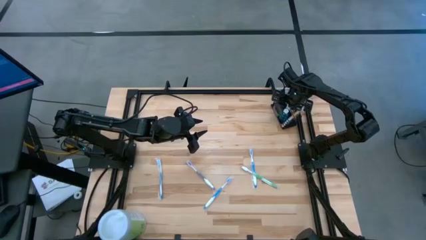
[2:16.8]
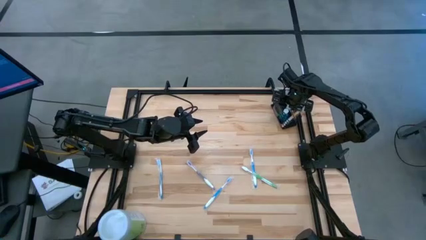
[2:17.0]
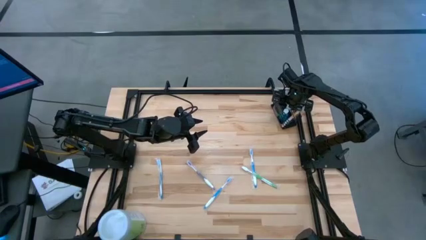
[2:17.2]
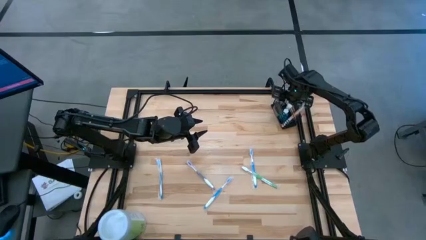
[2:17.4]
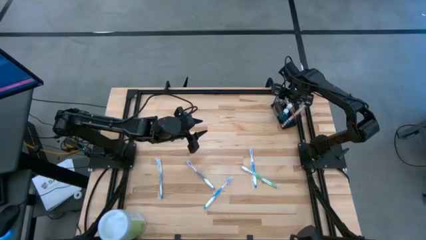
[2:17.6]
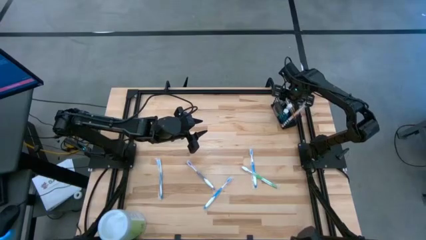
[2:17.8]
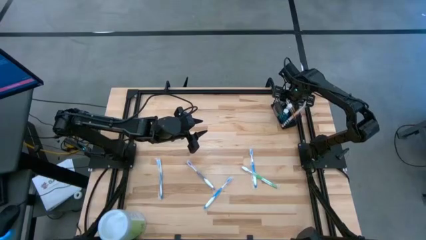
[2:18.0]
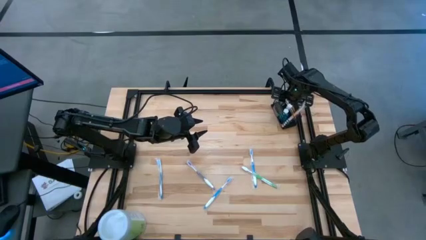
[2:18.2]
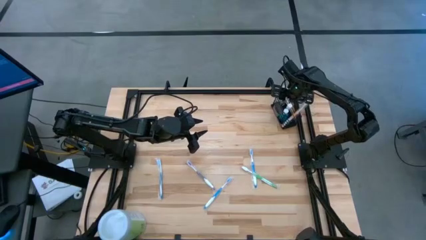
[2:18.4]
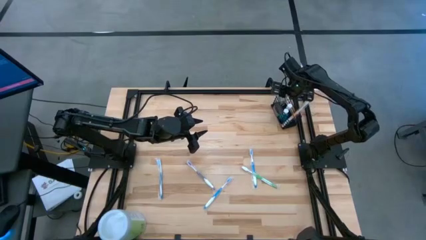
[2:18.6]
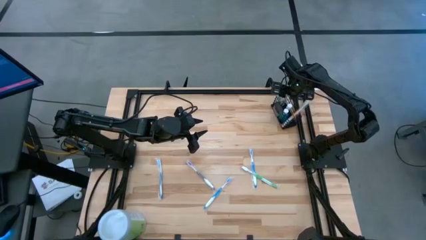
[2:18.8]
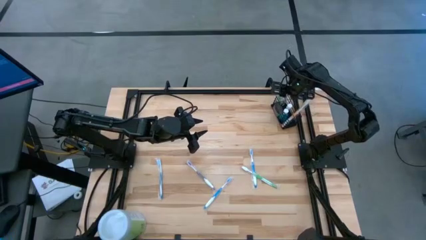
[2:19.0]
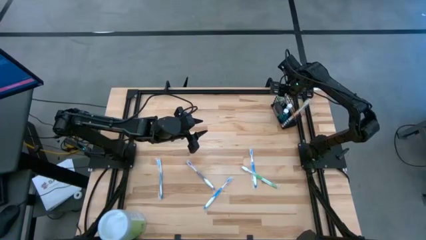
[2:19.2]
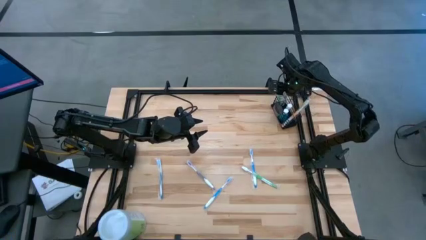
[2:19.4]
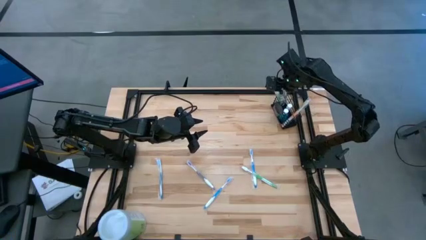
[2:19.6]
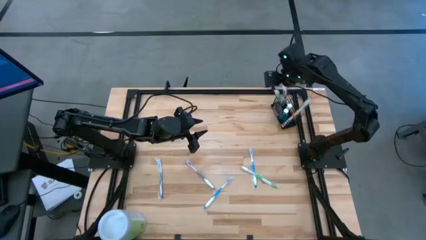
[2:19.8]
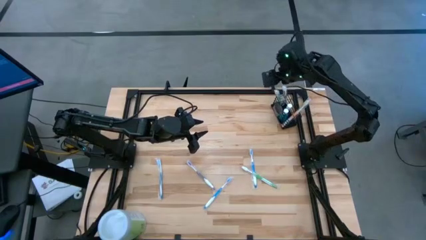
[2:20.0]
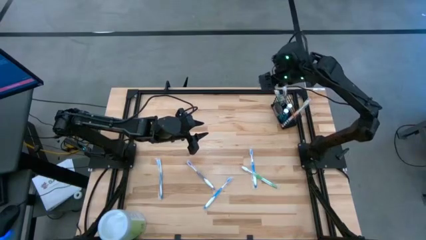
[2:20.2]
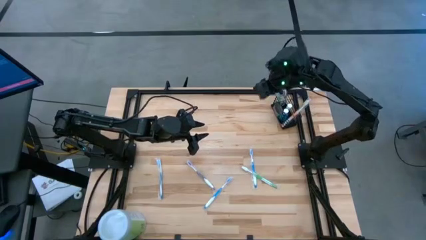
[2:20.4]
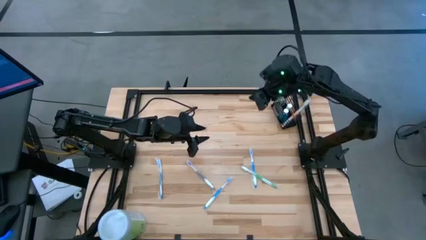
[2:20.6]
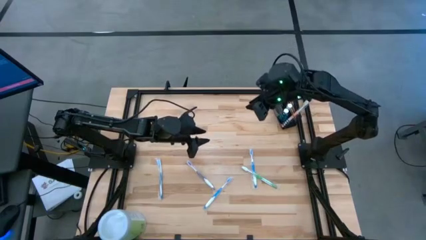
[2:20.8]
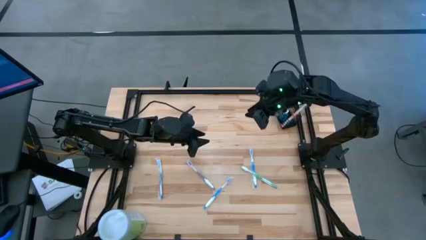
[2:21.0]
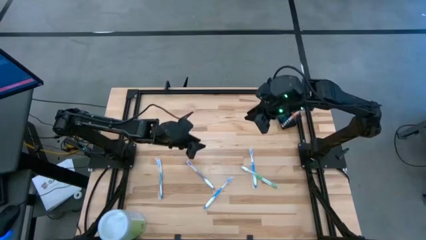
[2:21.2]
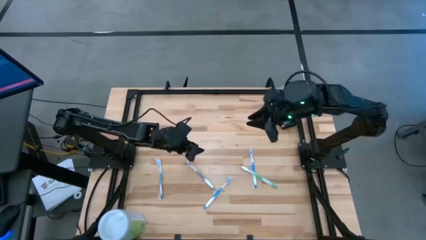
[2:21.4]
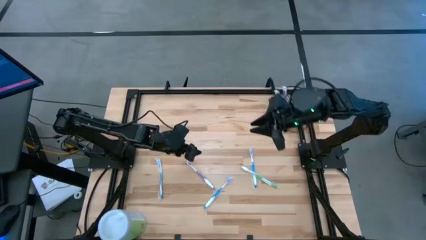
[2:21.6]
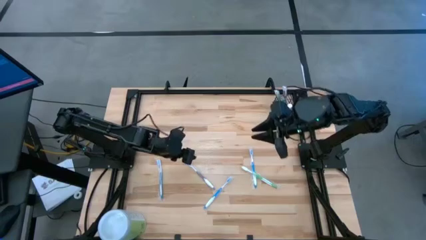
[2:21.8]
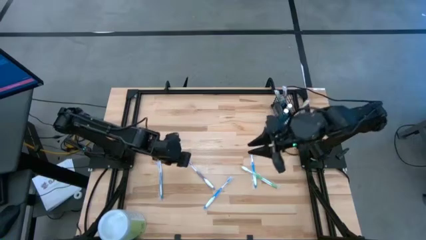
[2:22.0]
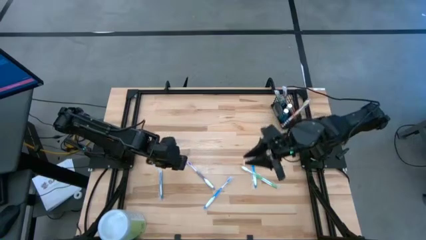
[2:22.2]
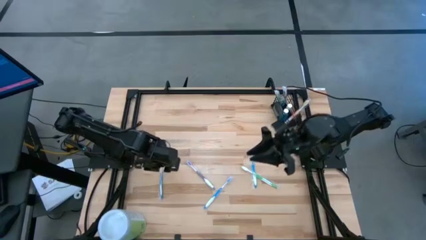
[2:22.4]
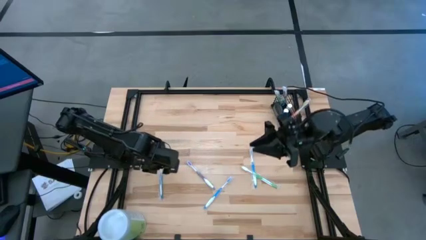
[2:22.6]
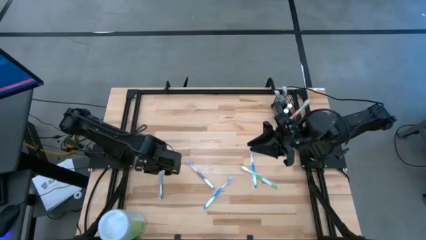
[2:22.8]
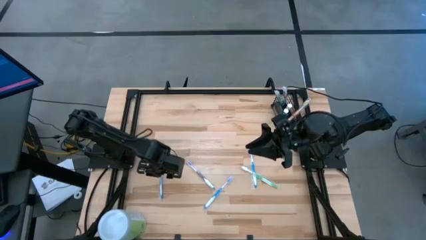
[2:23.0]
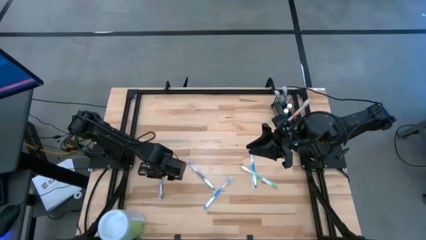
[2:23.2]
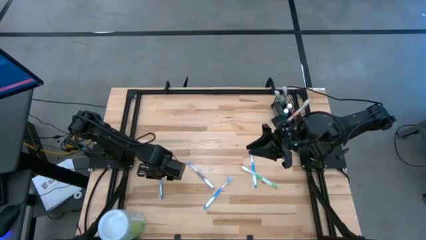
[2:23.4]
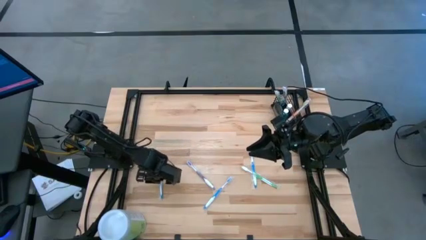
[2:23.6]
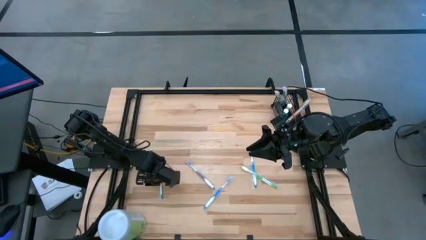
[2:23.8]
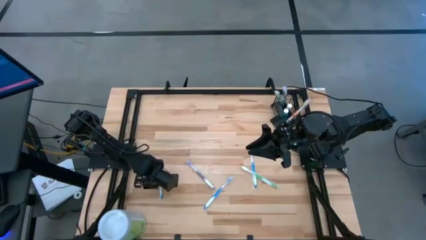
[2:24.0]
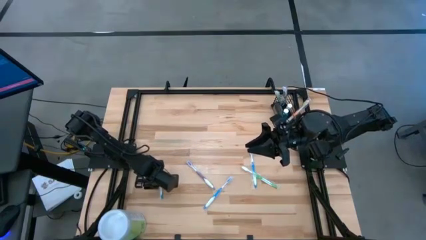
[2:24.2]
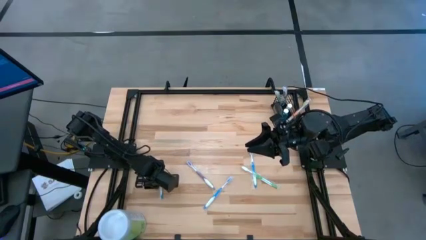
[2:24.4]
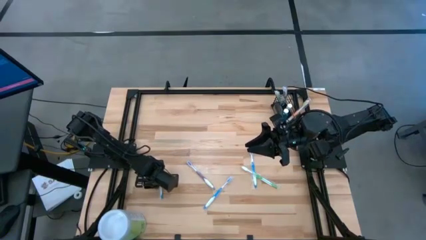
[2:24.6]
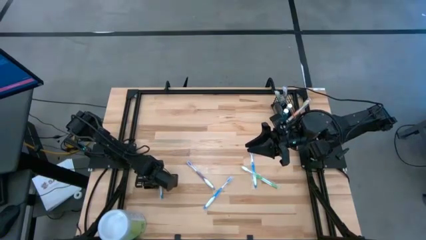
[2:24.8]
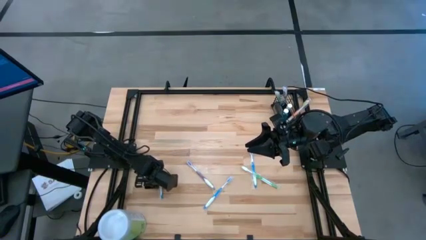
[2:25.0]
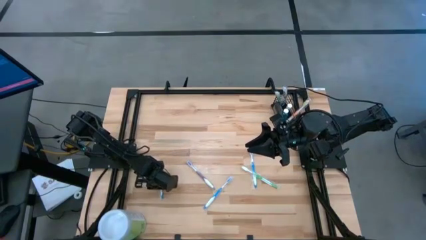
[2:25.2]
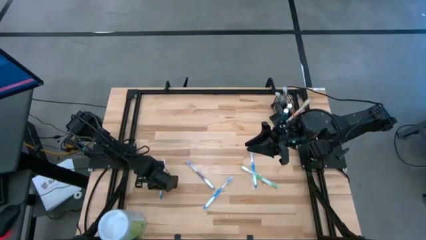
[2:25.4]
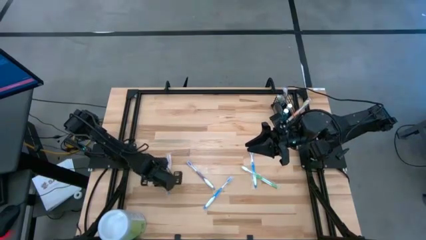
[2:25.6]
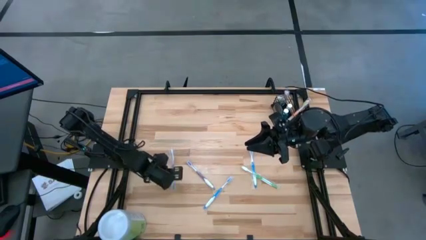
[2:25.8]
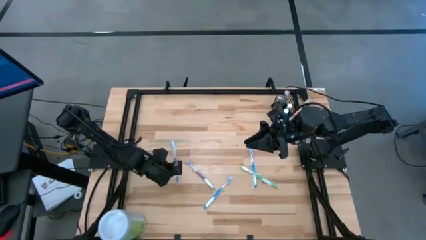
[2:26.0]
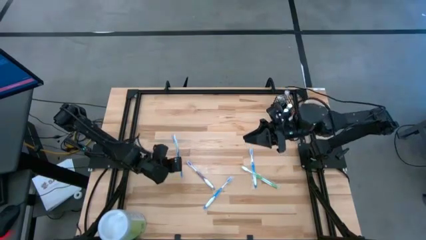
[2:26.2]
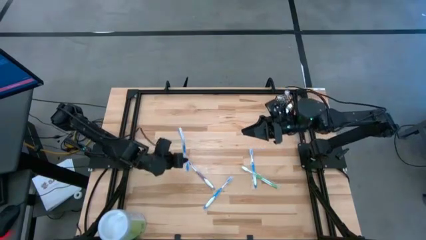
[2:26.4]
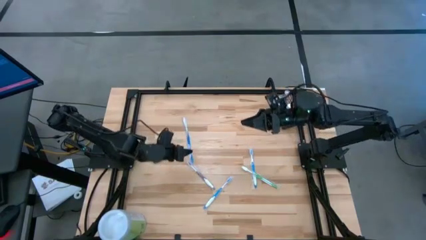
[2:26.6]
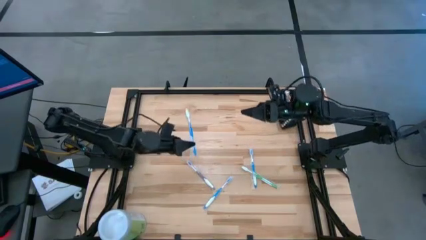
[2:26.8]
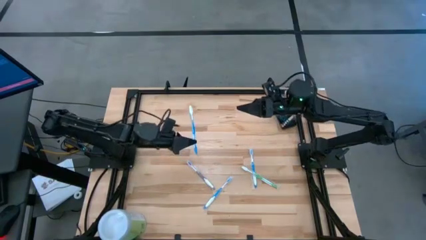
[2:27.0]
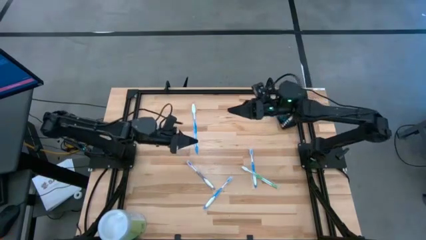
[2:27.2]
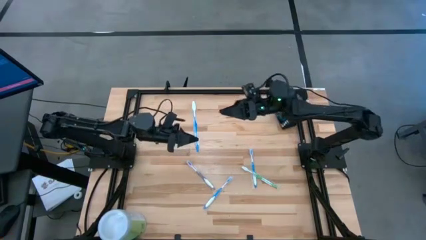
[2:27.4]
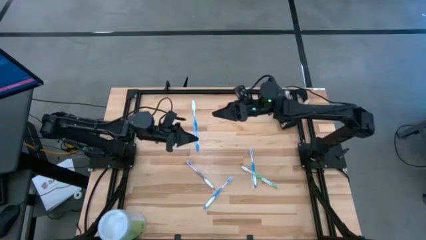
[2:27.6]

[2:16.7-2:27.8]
Task: Pick & Place toothbrushing station
Put the left blue toothbrush in the right section of wire organizer

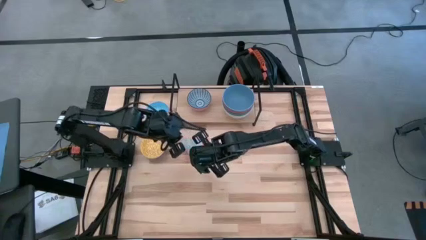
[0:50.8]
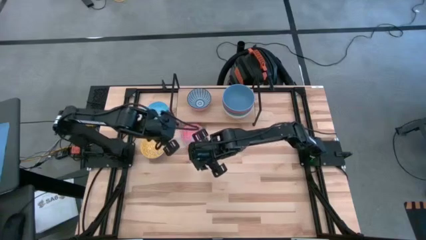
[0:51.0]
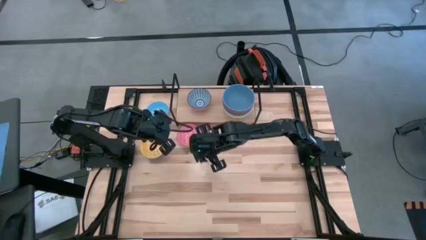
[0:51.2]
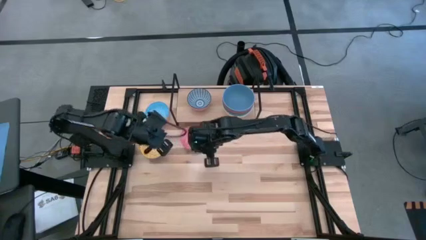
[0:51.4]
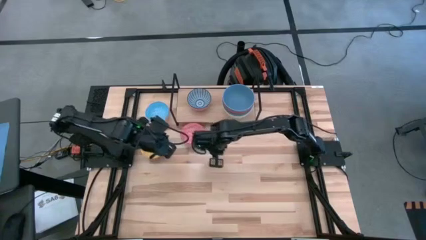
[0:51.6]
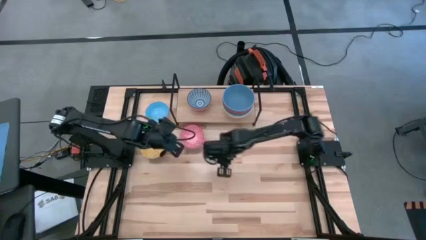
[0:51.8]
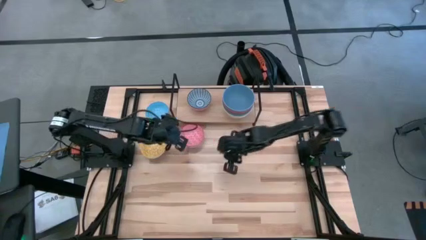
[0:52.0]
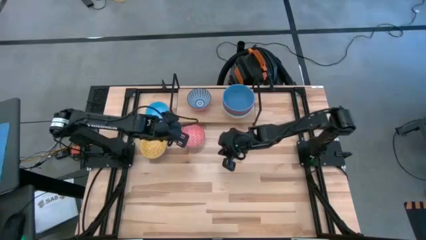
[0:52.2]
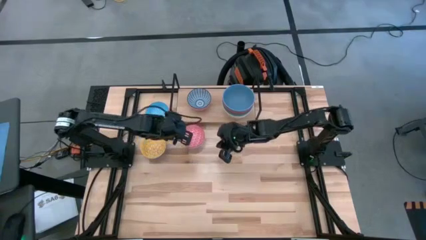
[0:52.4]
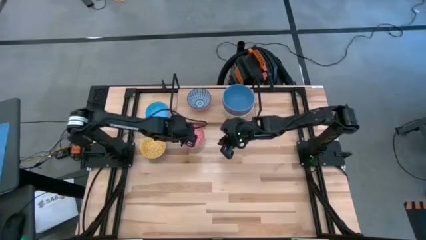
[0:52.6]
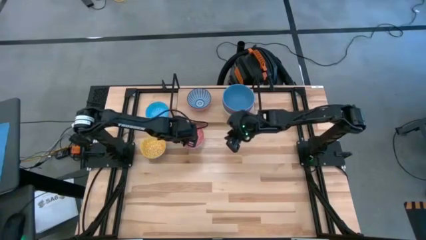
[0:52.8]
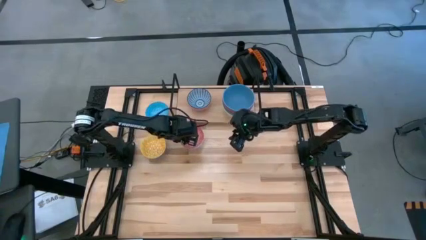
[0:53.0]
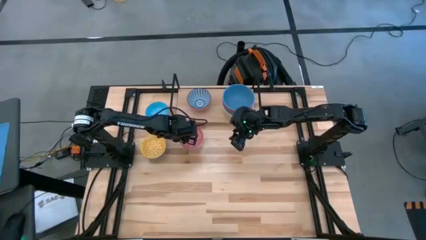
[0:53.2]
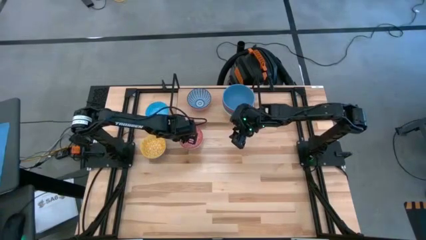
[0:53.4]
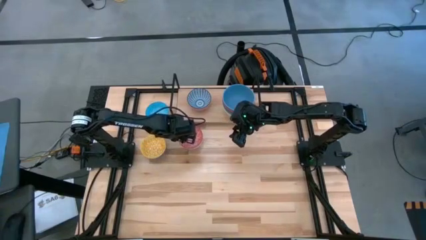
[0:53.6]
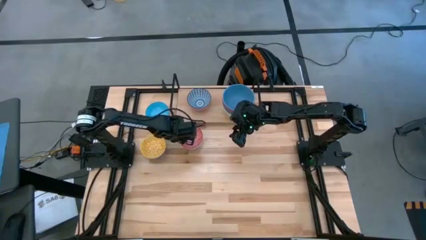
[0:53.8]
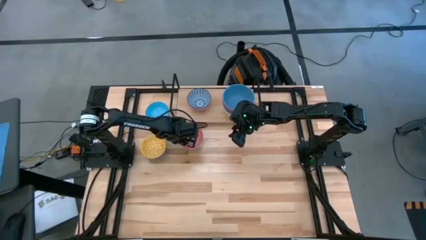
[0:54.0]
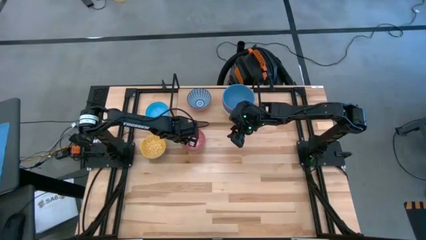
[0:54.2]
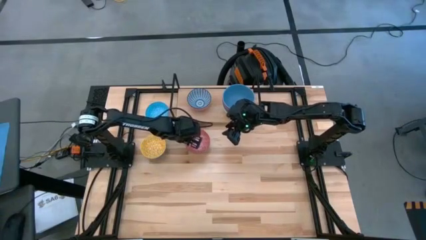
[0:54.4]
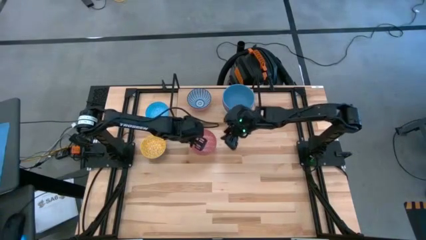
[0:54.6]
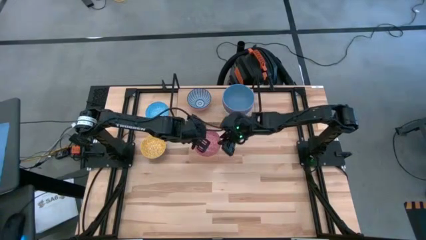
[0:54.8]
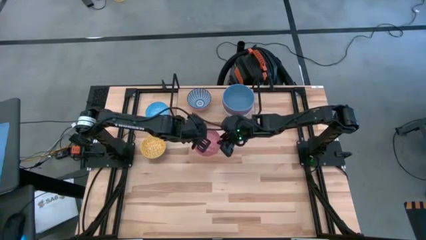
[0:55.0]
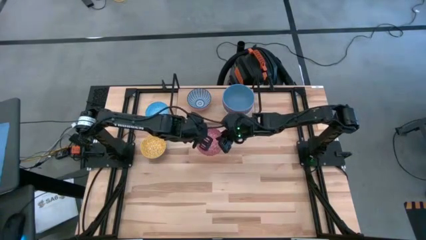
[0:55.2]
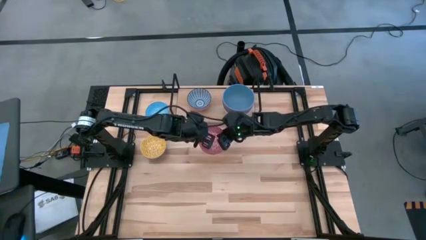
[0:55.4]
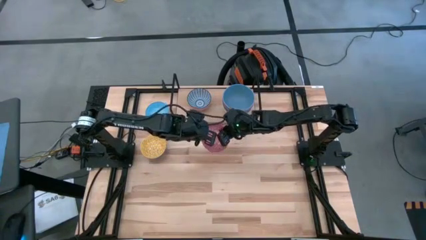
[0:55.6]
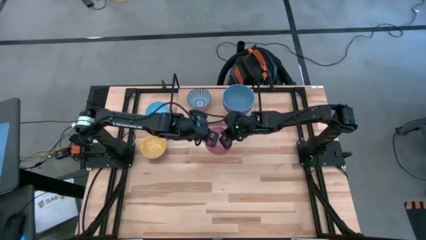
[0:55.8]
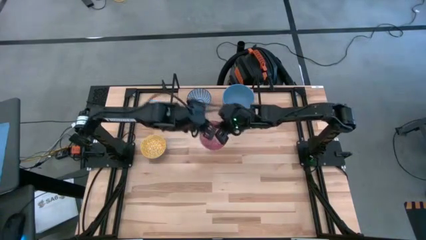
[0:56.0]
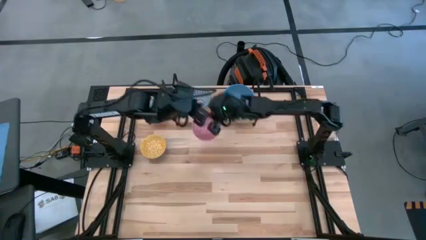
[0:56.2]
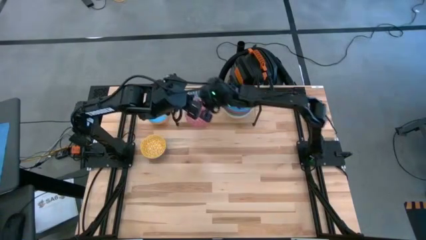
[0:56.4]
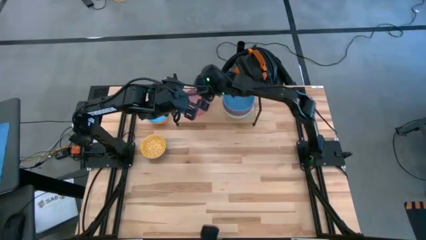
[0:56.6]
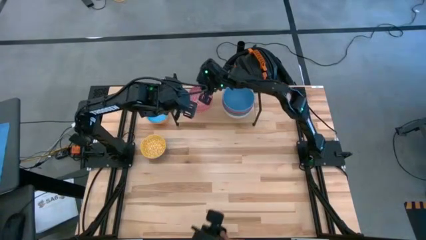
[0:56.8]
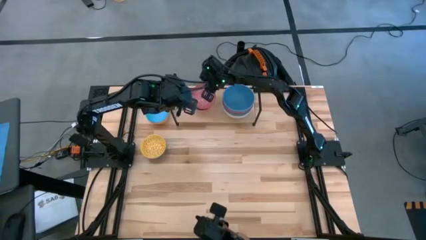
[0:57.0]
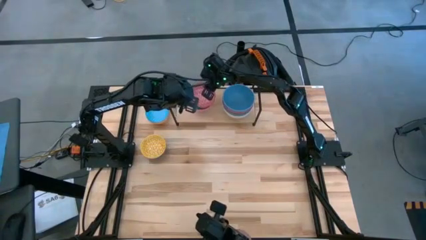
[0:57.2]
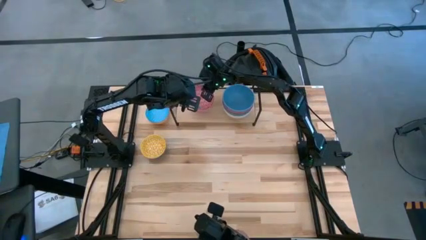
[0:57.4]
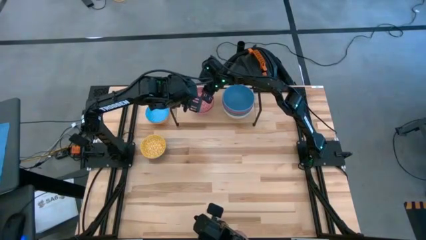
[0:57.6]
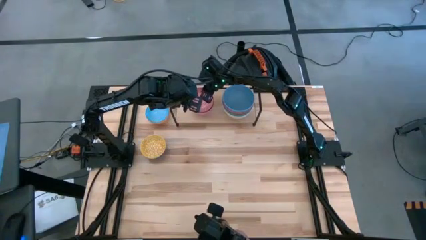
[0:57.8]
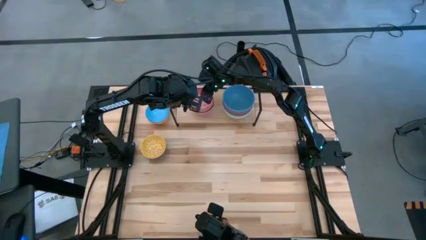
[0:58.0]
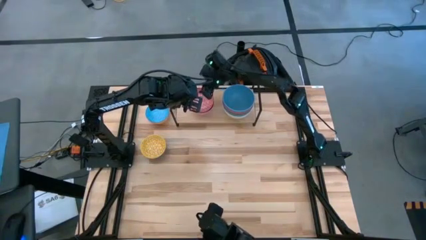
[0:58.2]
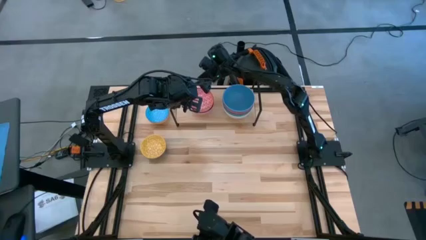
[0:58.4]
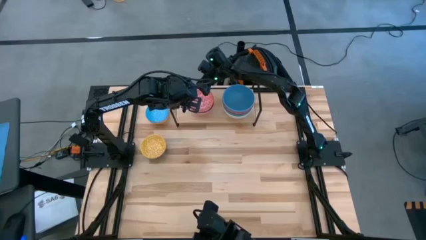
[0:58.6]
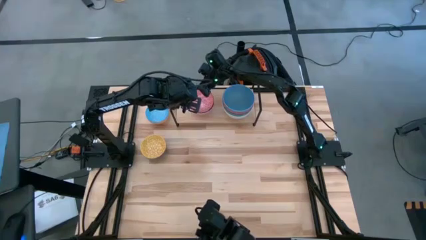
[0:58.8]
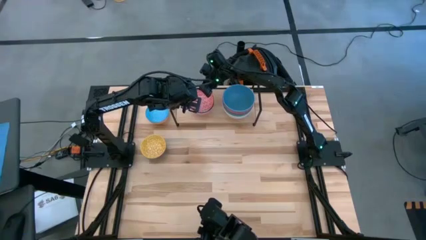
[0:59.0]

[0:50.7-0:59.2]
Task: Place and stack bowls onto a shelf
Stack the small red bowl on the small blue bowl on the shelf
